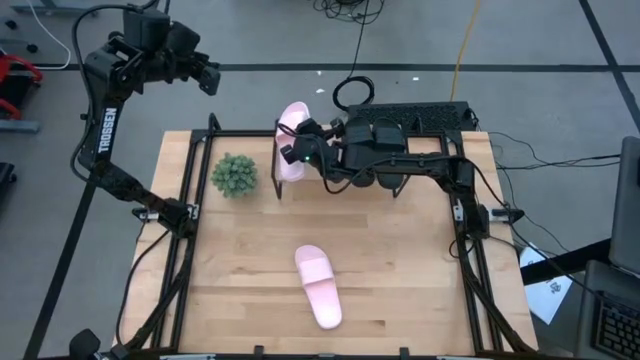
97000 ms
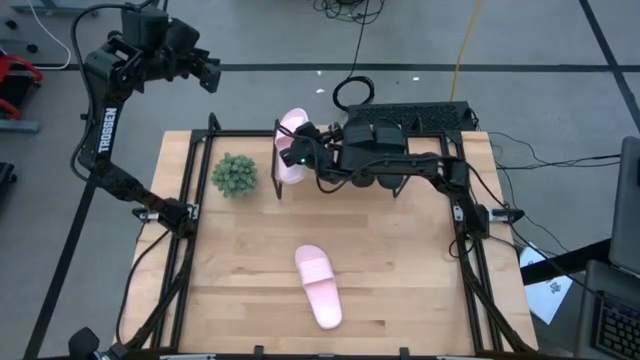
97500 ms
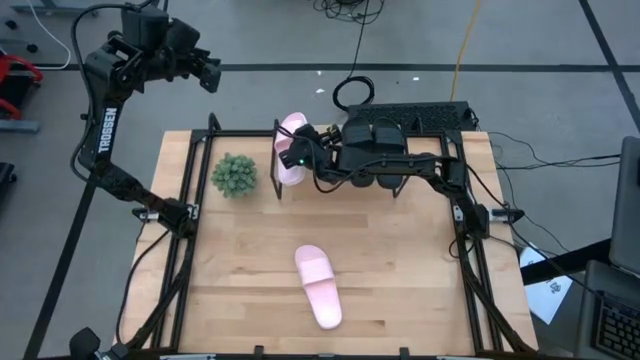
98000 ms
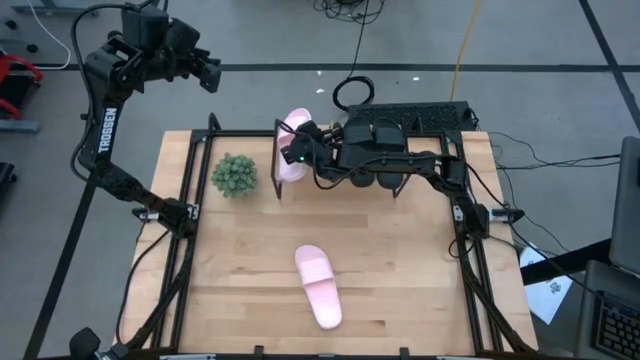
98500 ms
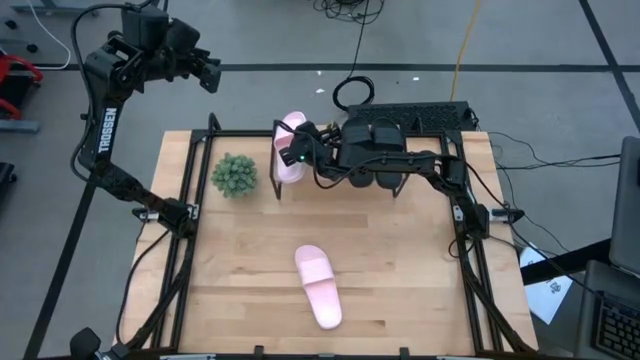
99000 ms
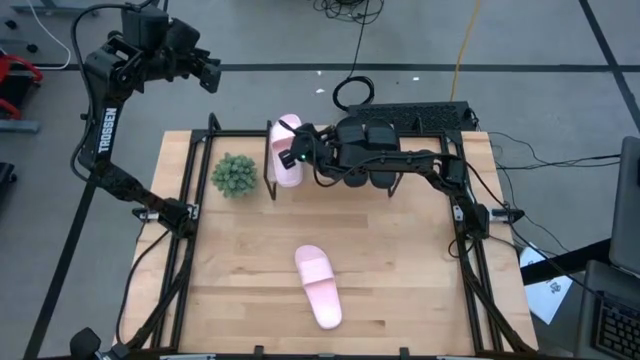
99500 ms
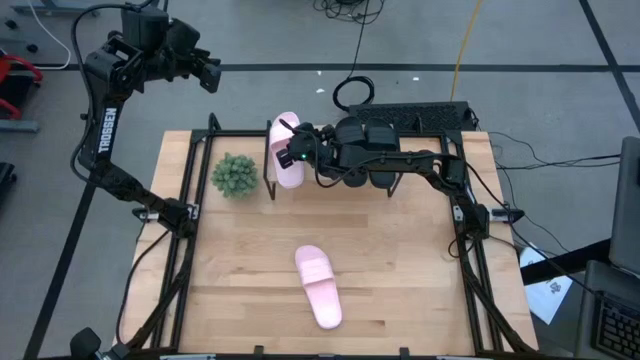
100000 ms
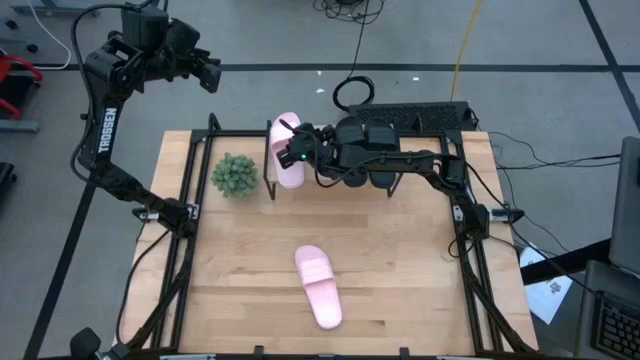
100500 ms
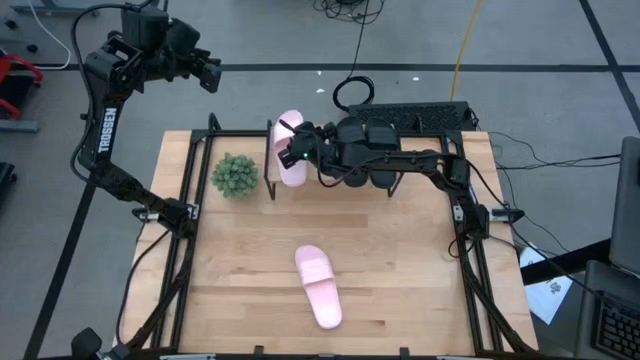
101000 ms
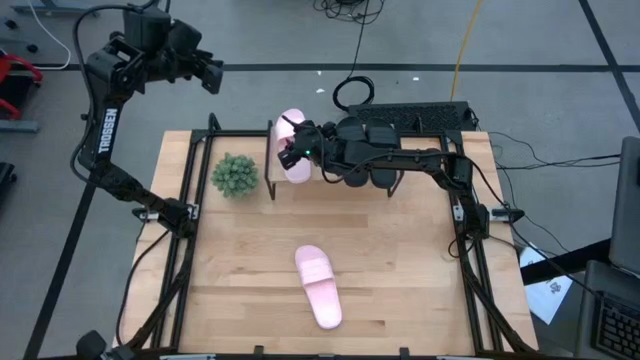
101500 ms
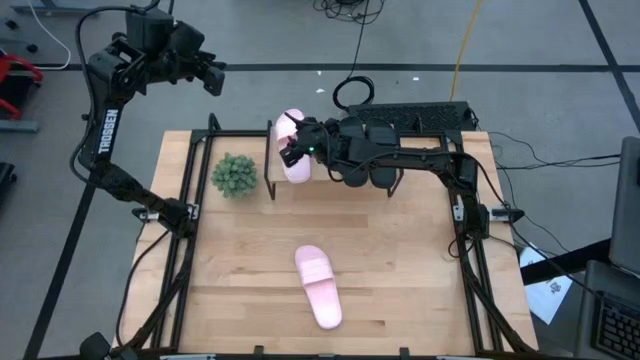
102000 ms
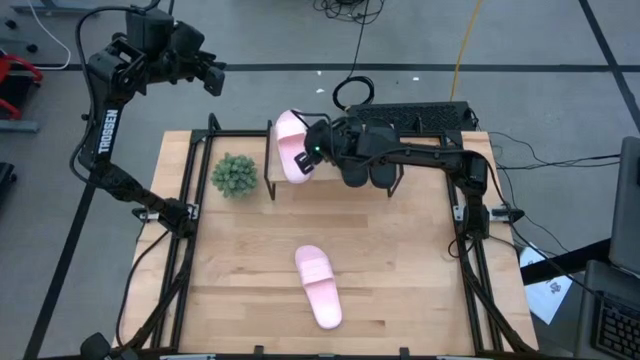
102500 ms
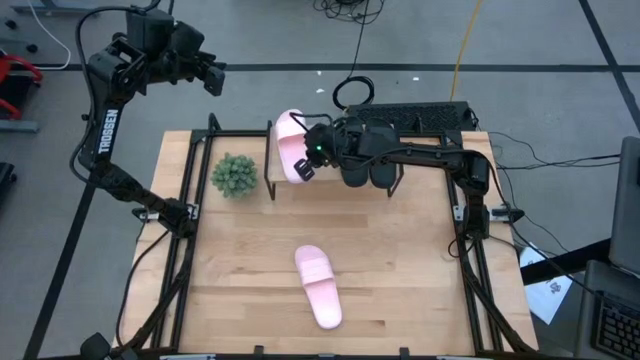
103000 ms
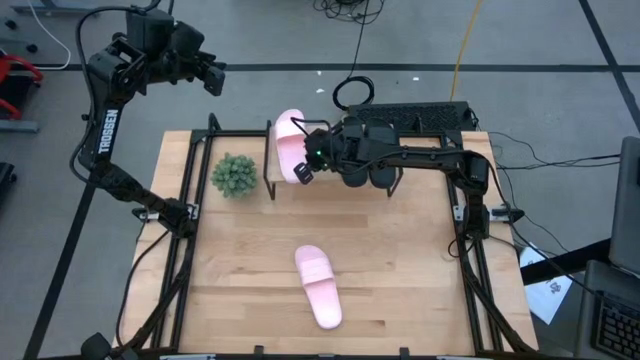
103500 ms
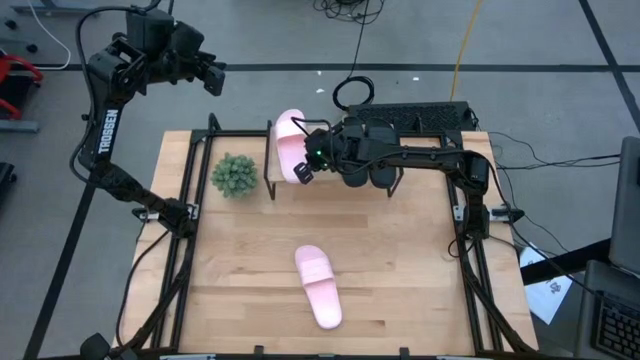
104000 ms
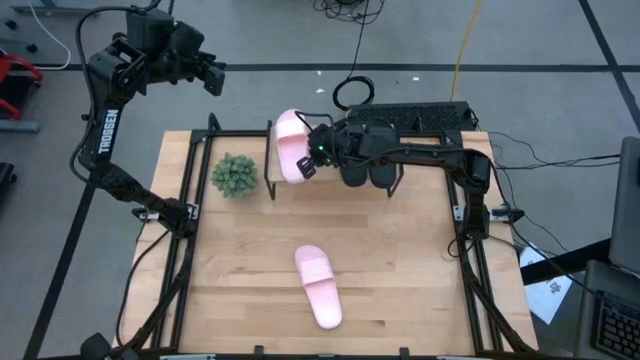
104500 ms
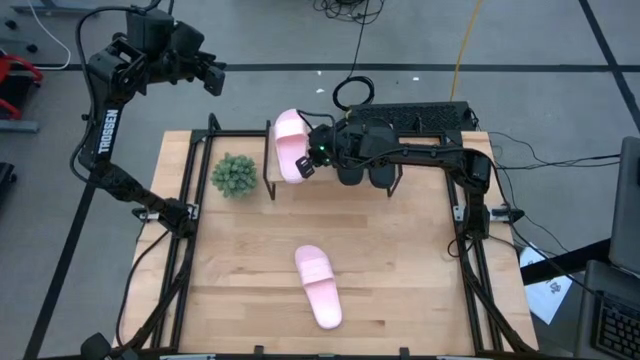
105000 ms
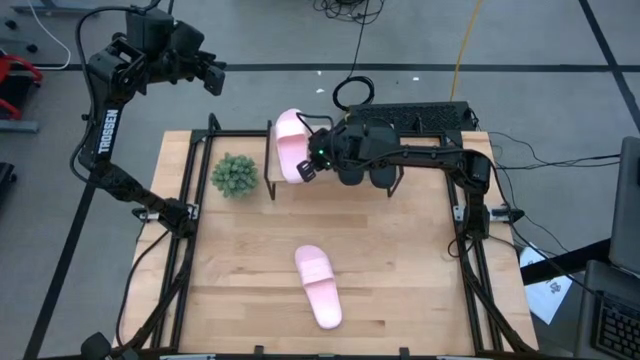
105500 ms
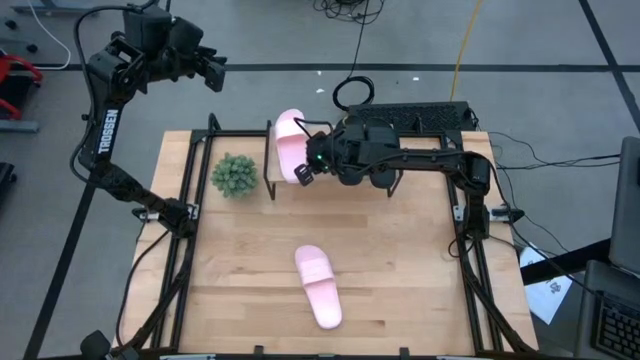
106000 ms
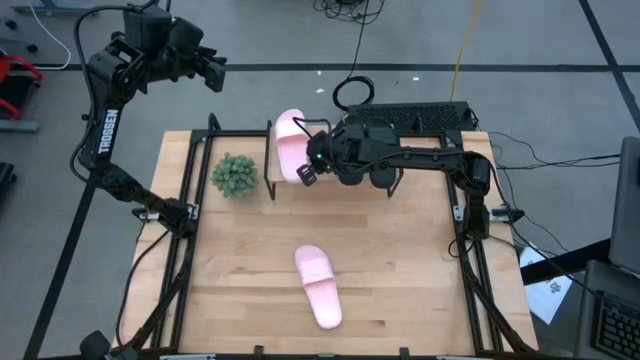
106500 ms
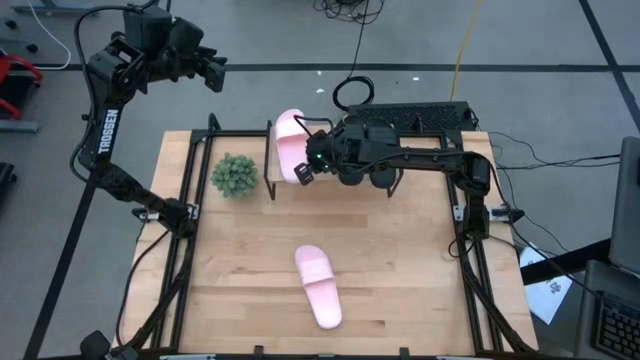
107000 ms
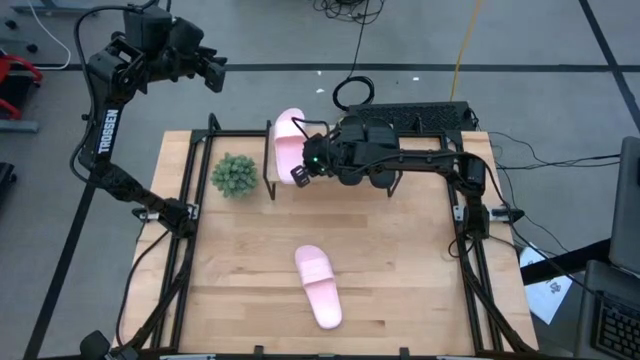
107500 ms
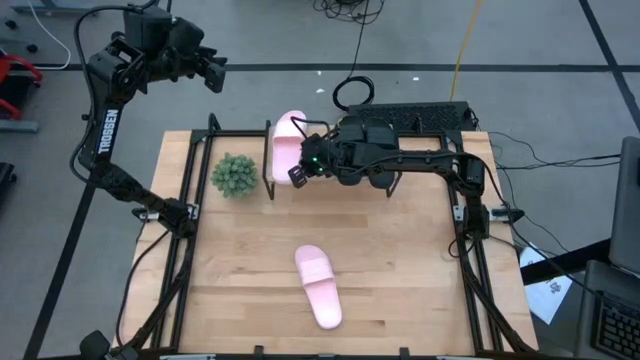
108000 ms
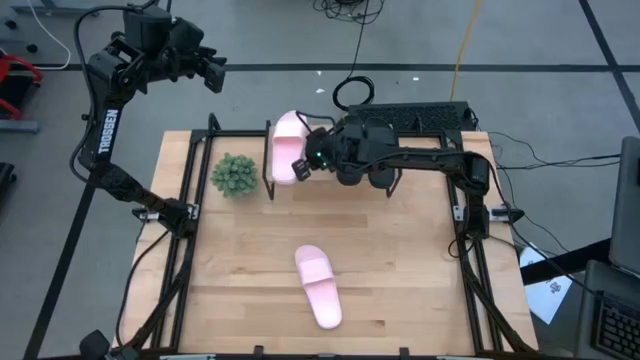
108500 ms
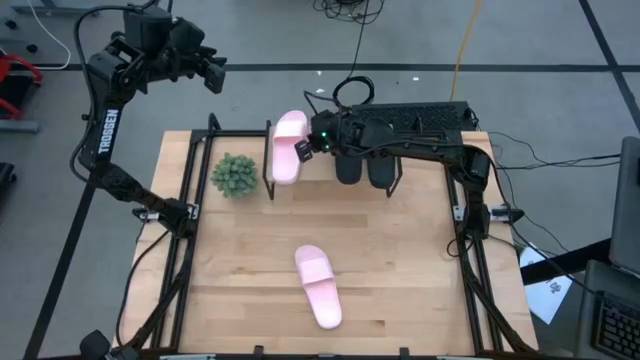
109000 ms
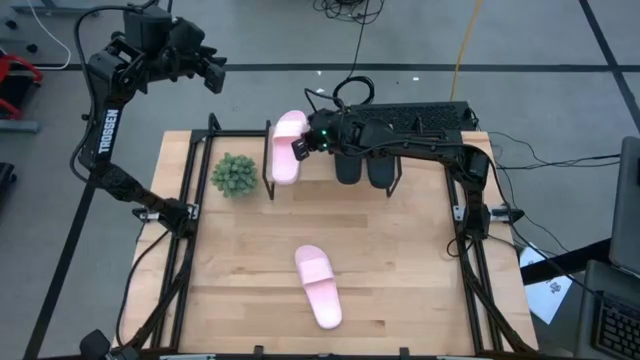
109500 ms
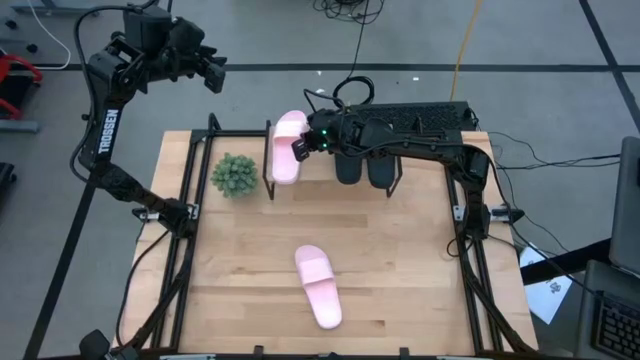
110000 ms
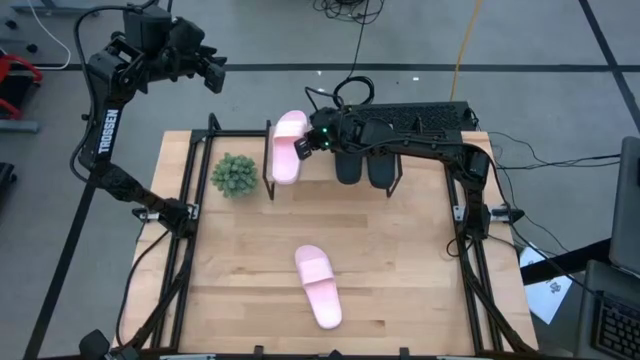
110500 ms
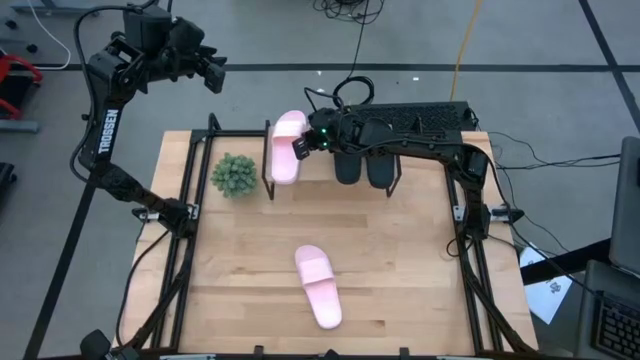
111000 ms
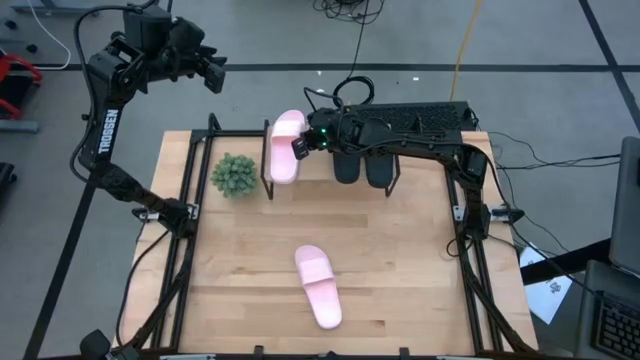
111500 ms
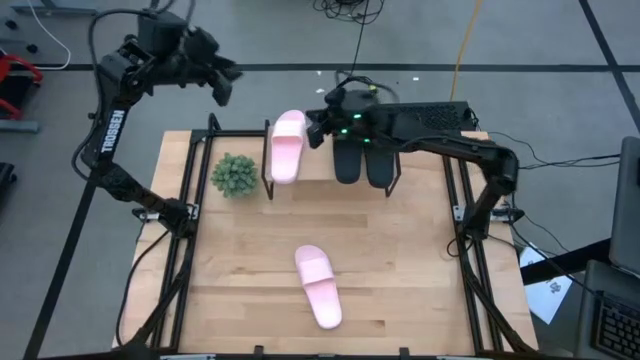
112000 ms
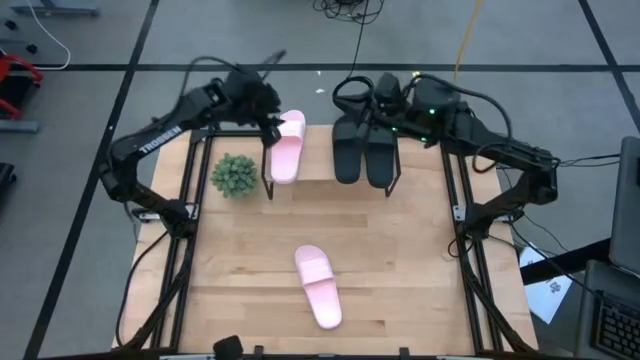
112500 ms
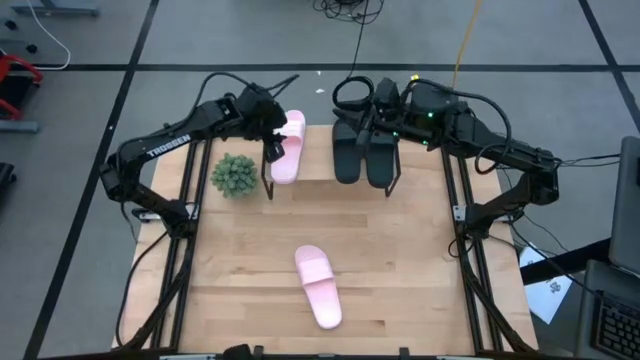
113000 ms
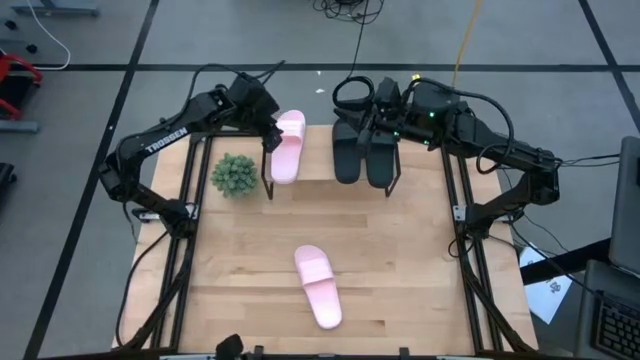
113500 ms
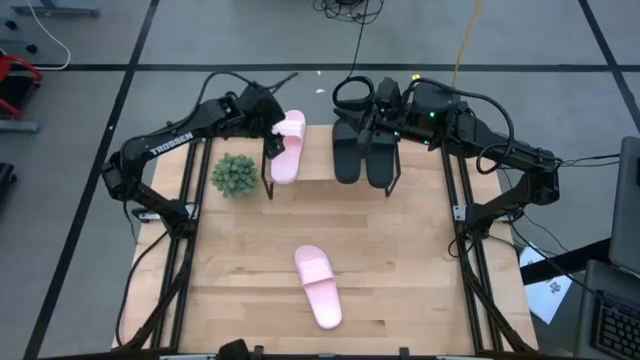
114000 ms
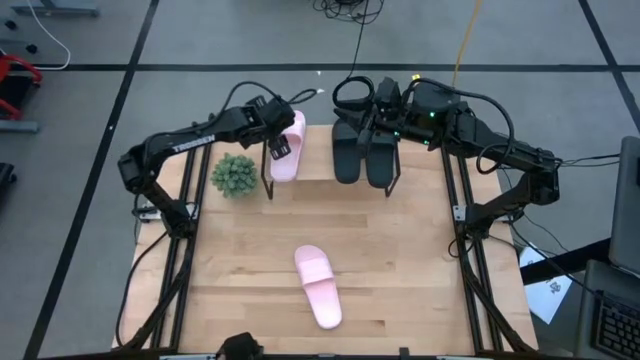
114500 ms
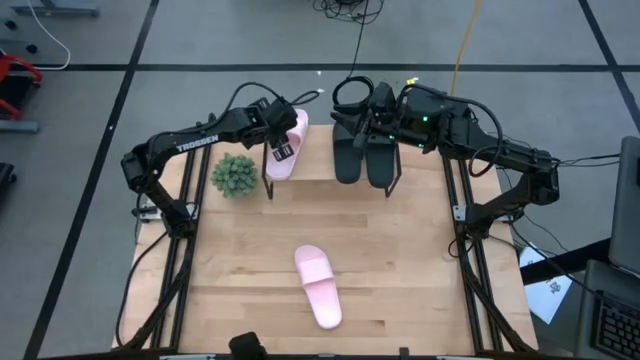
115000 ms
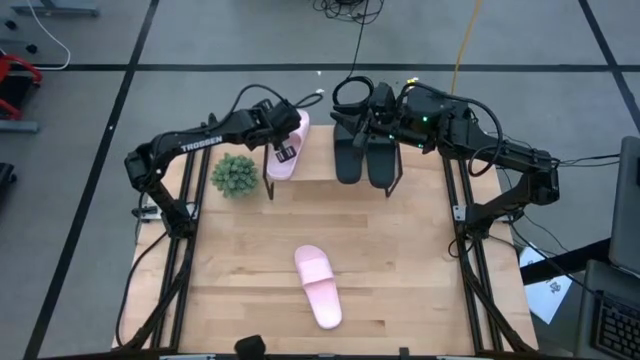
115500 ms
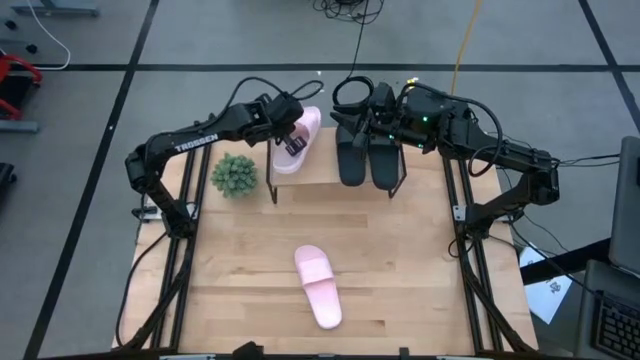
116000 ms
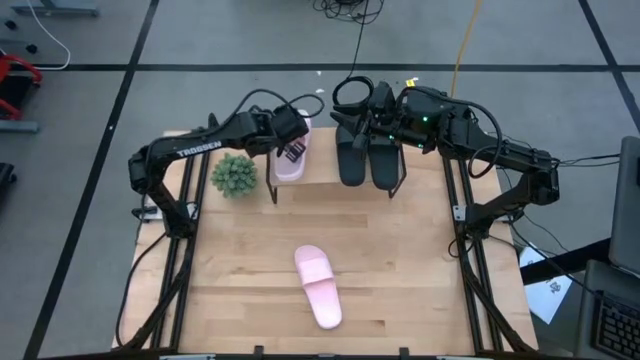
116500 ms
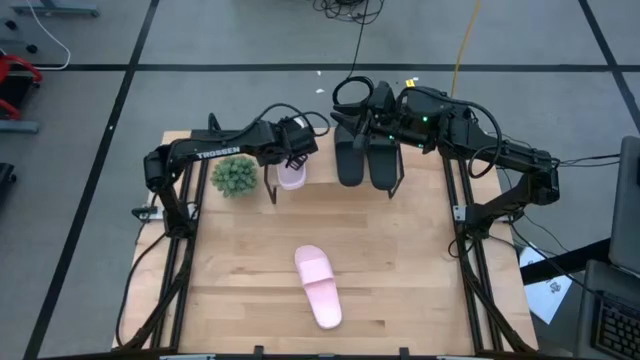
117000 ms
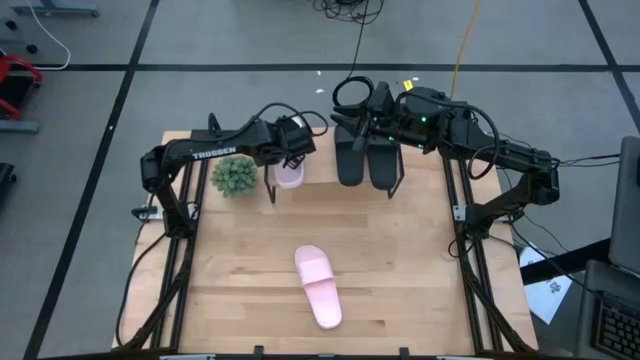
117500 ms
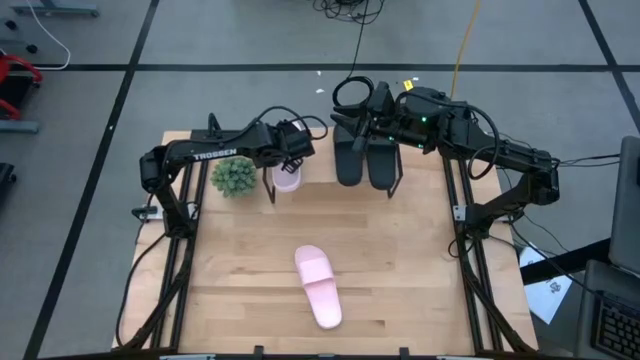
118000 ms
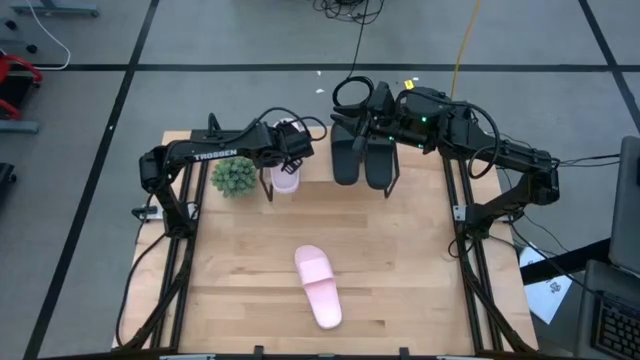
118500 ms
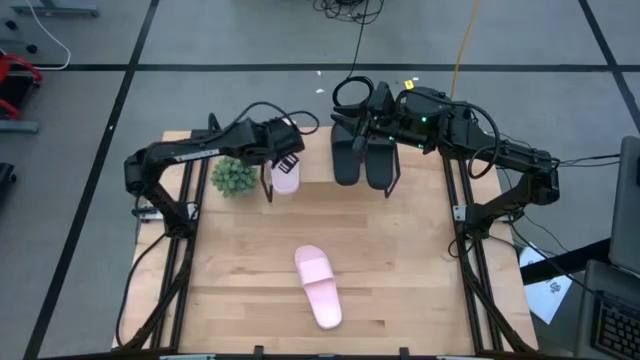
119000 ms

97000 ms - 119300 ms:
Task: Pick and place slides into the shelf
Put the left pink slipper on the shelf
